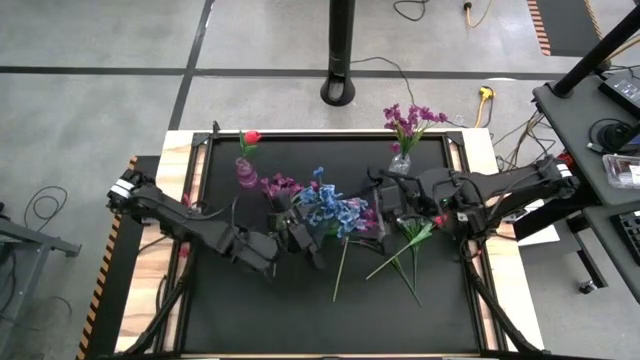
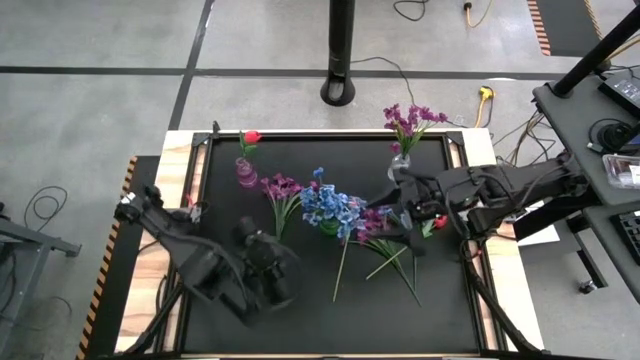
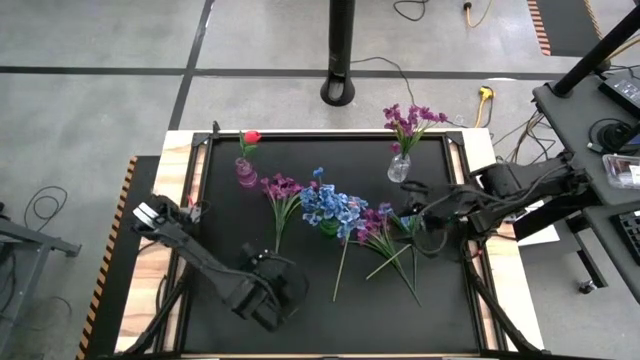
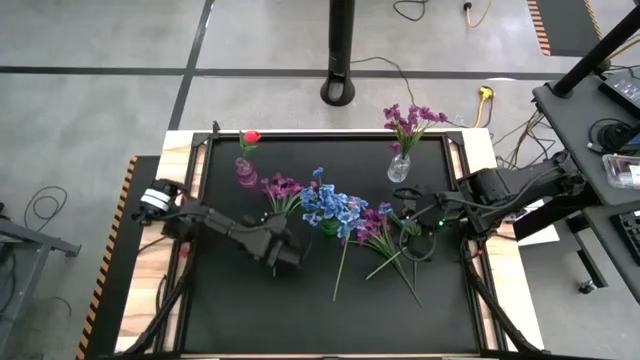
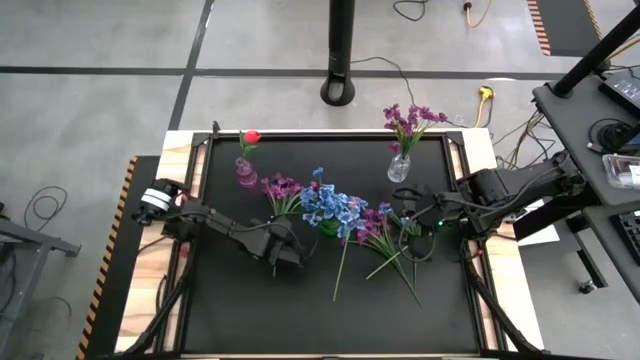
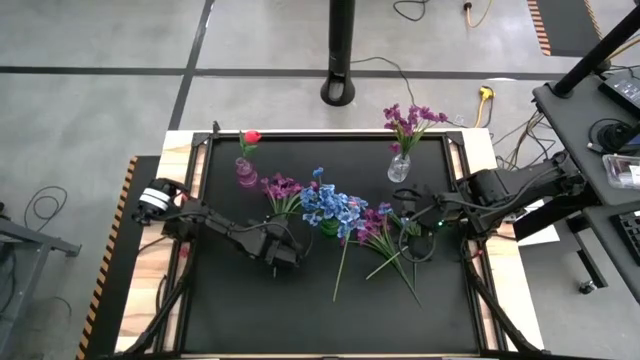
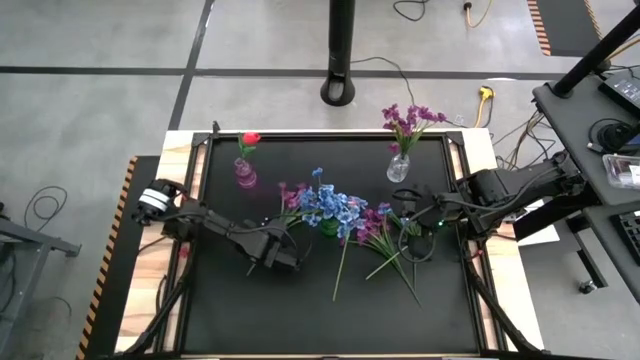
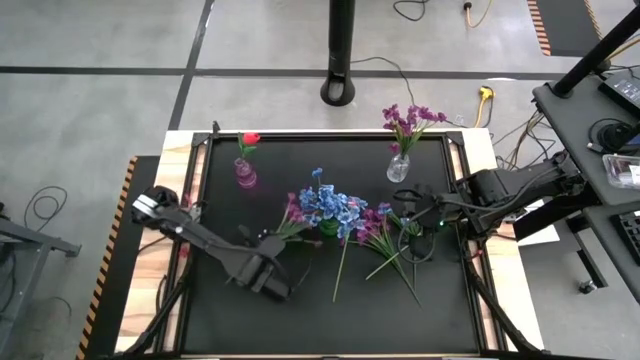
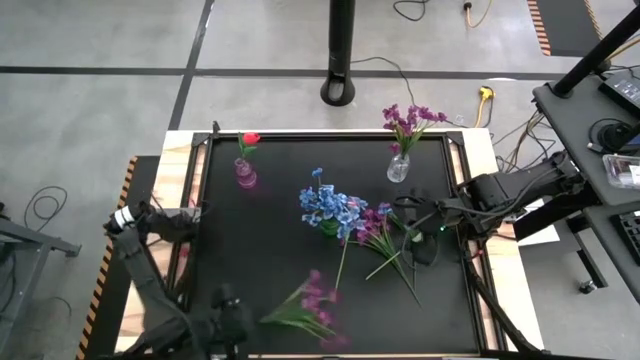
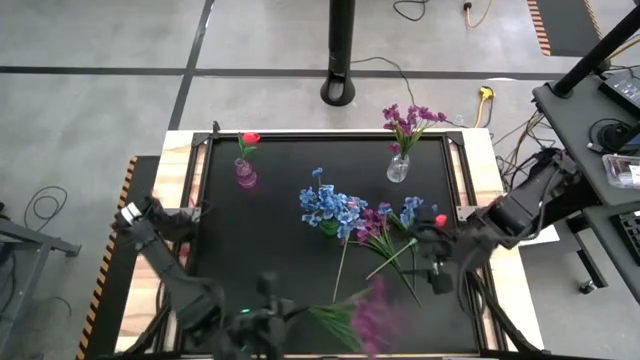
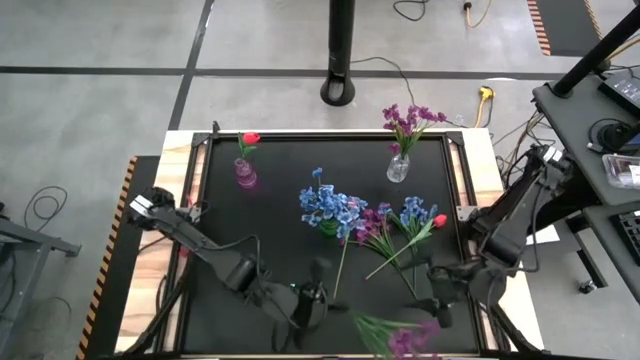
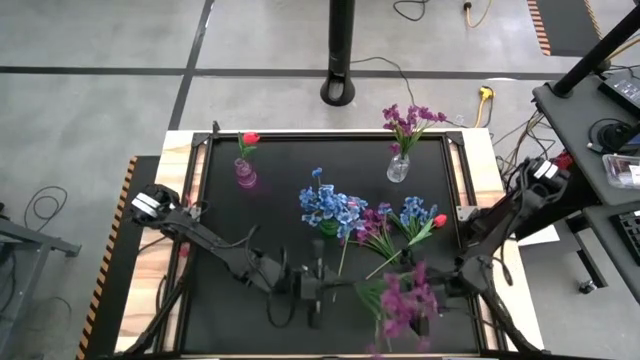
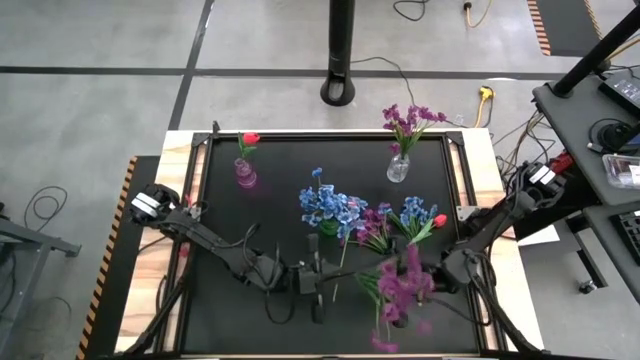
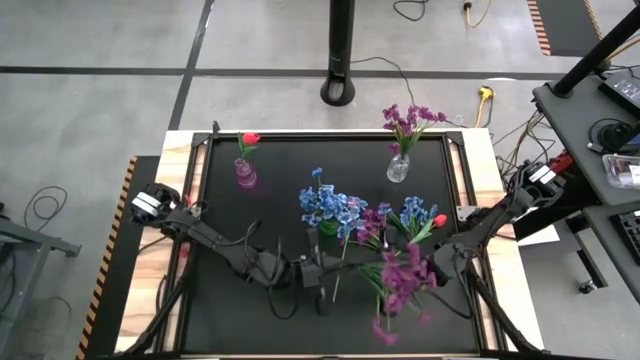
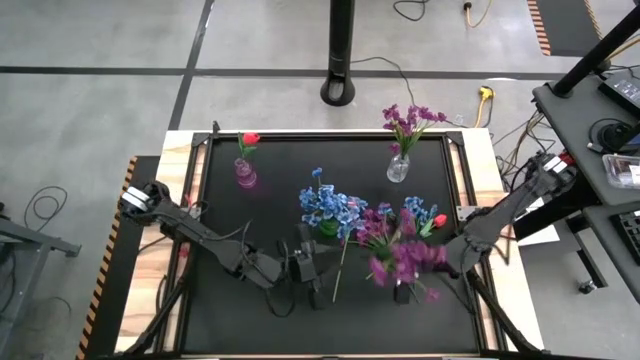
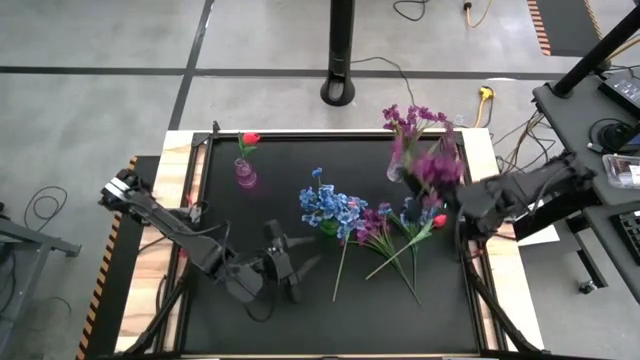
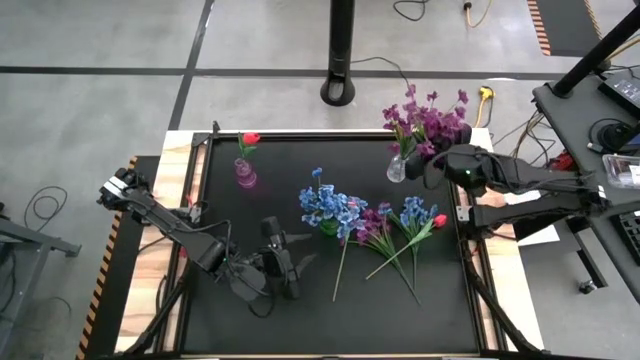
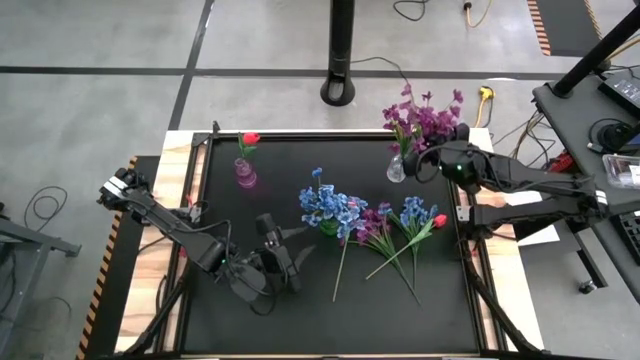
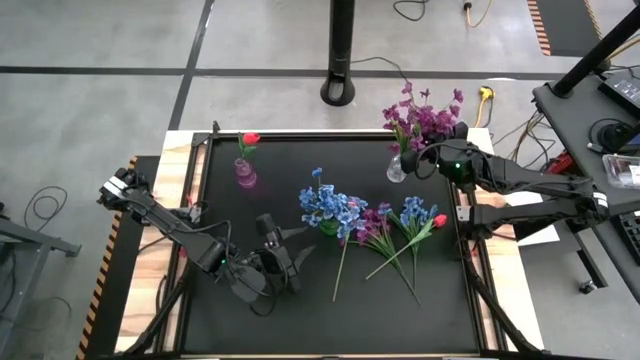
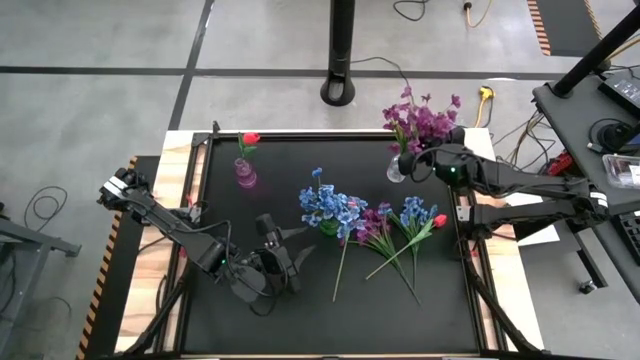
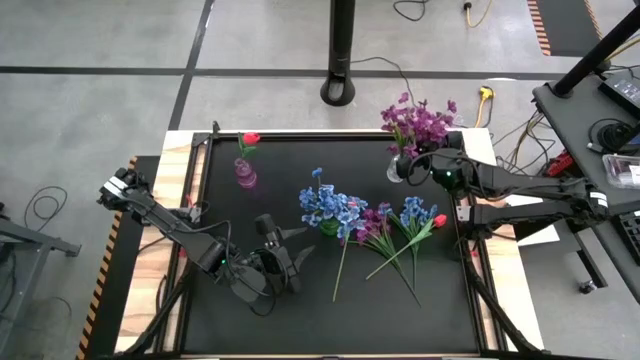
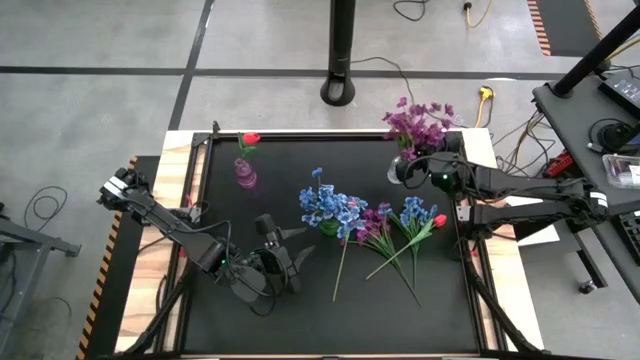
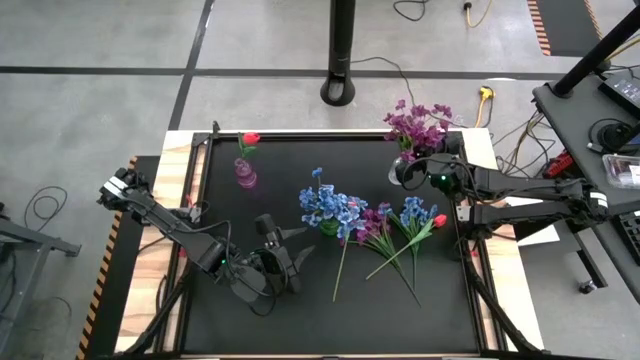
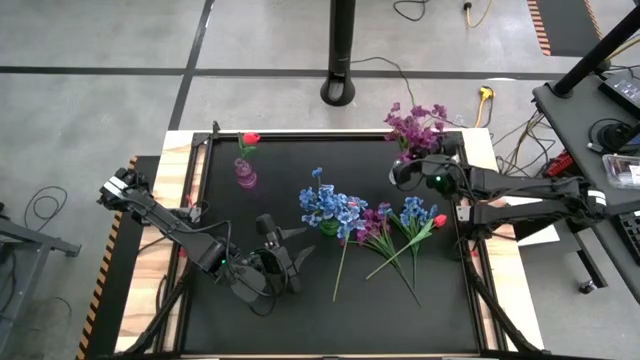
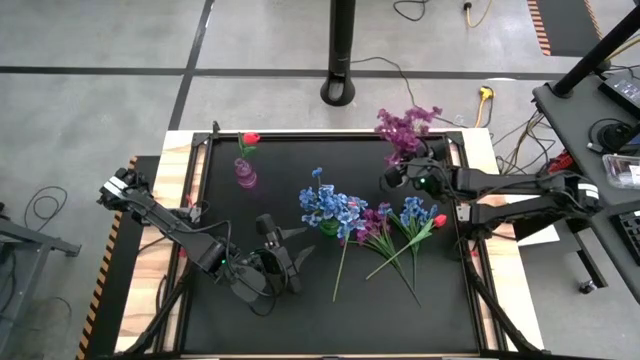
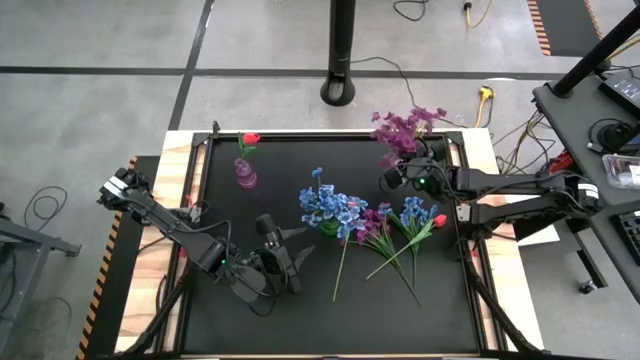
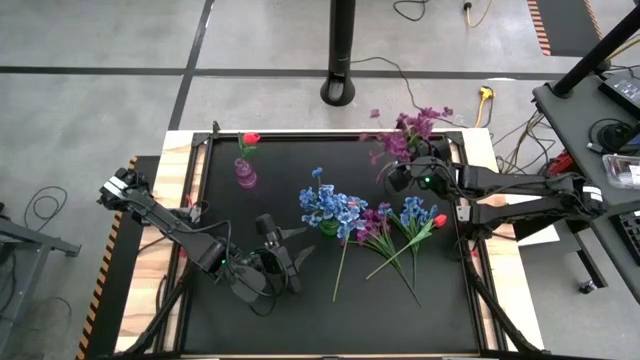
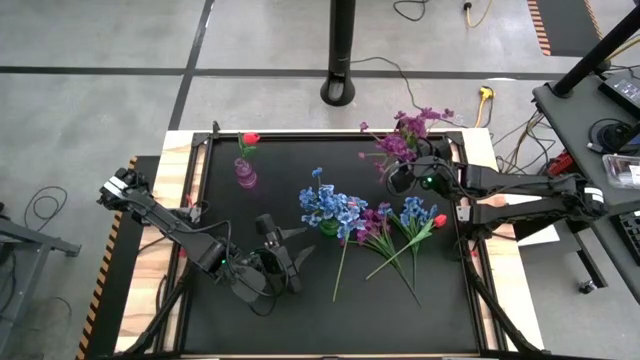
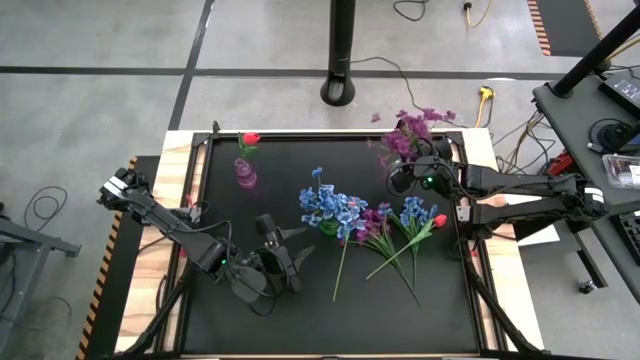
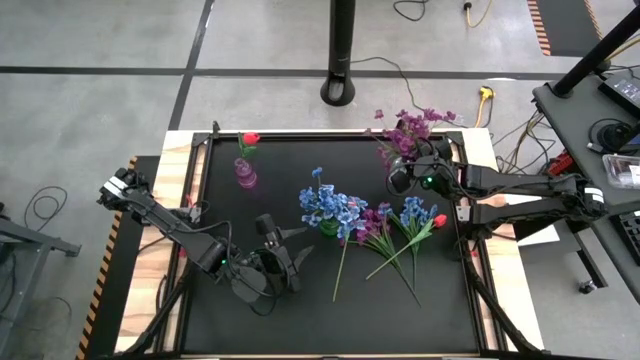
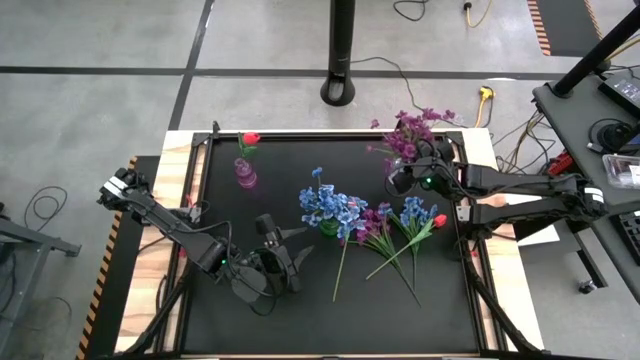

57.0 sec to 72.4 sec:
Task: Sort flowers into vase by color
Put the left violet flowers into the transparent vase

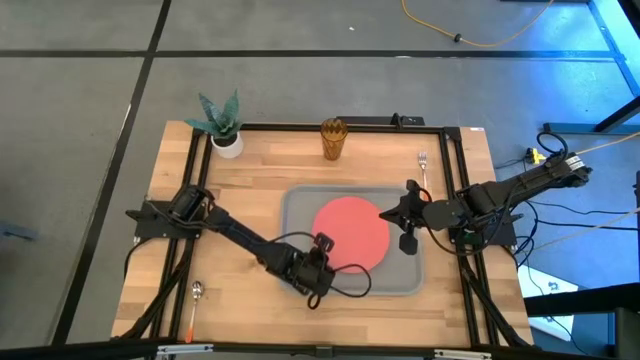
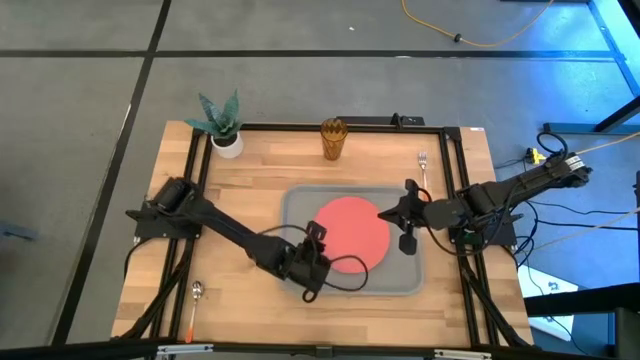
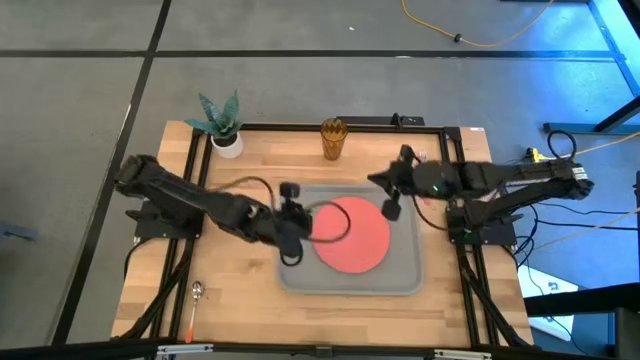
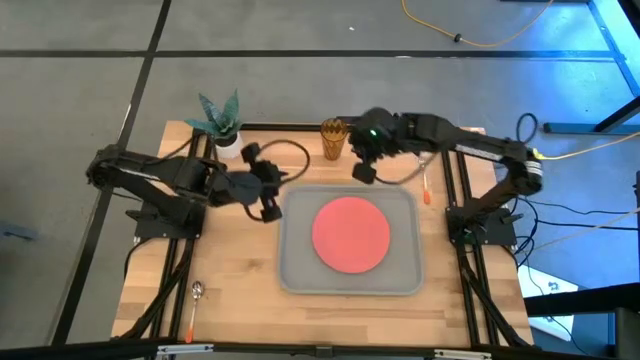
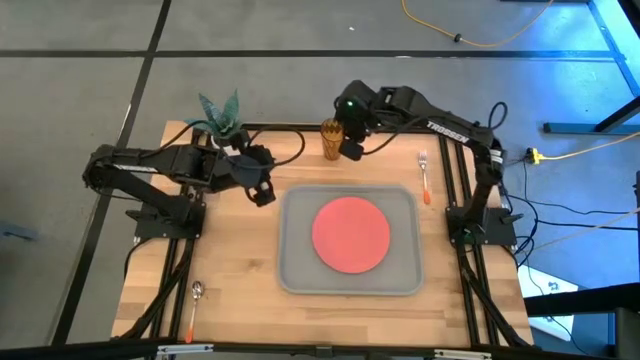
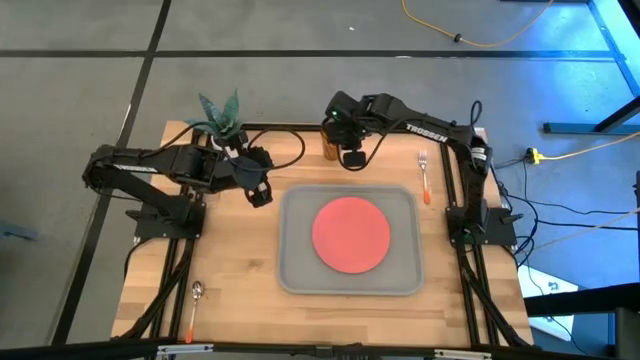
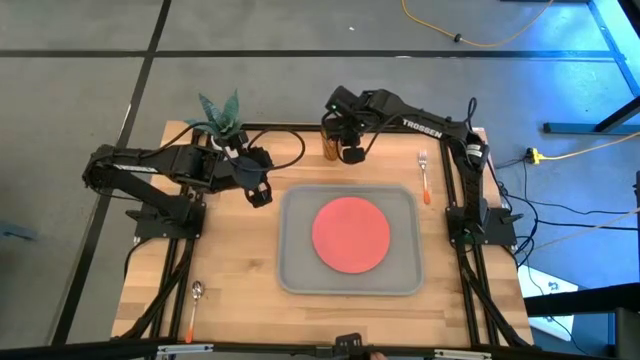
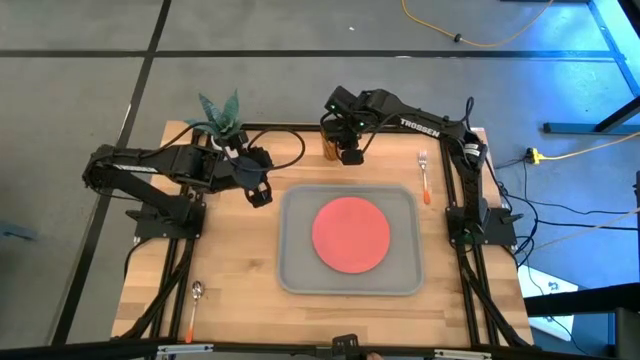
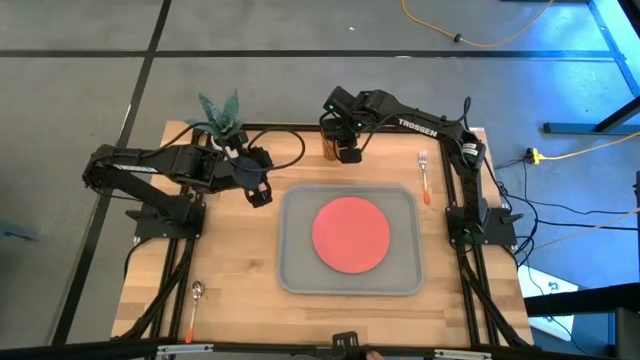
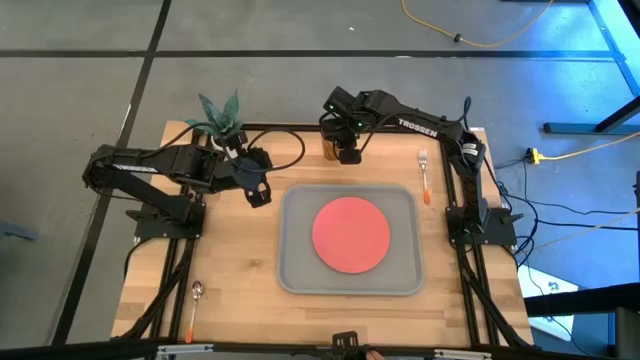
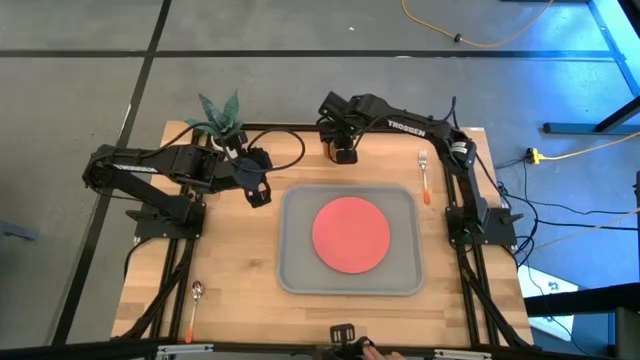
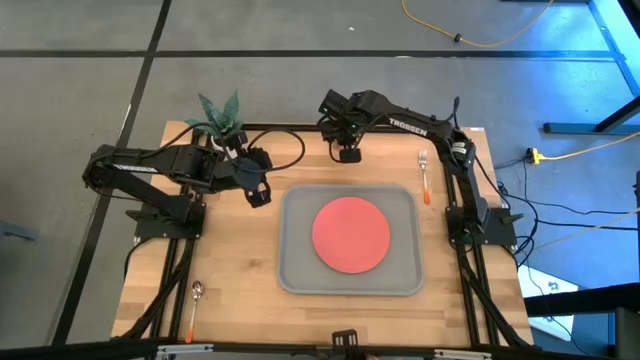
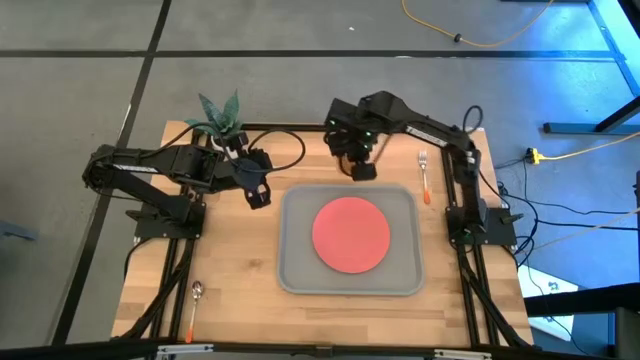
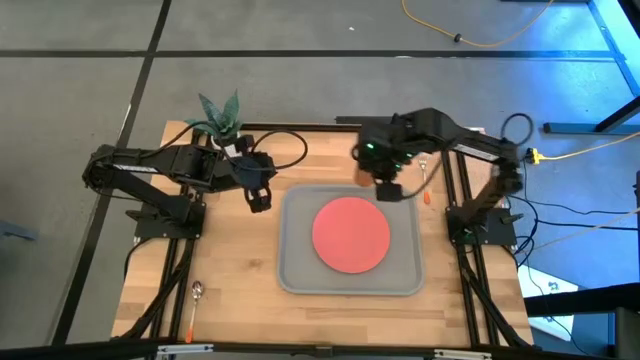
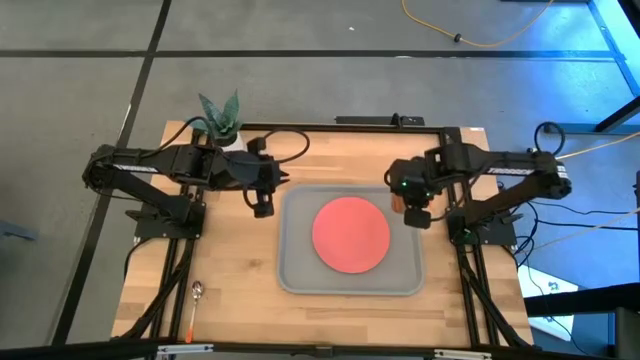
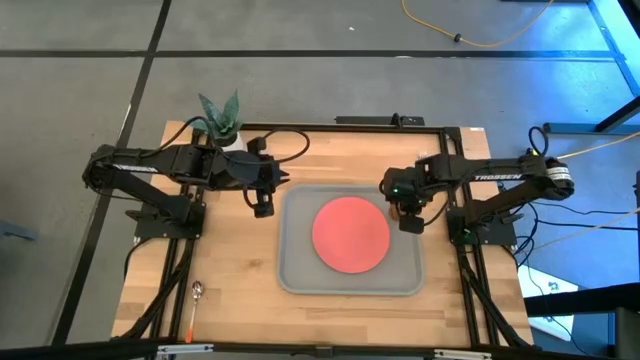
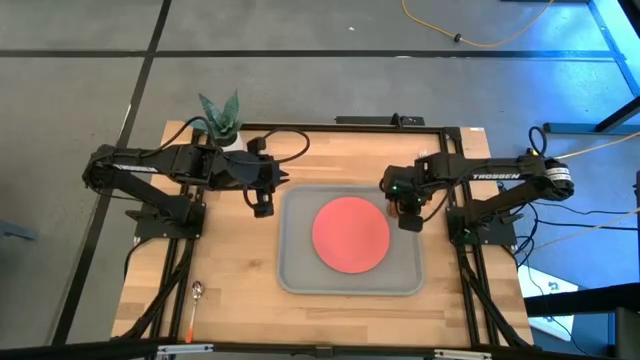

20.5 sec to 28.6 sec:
Task: Pick and place plate/cup/fork/spoon on tray
Put the drinking glass on the top right corner of the serving tray
